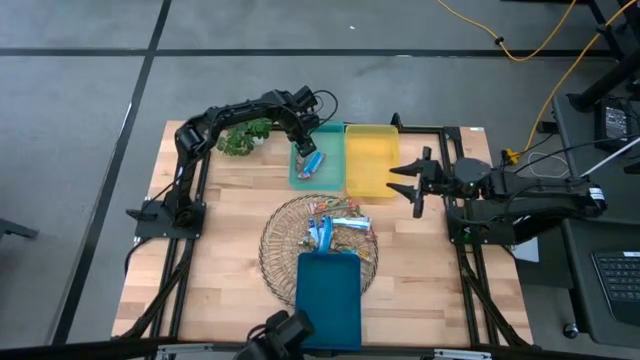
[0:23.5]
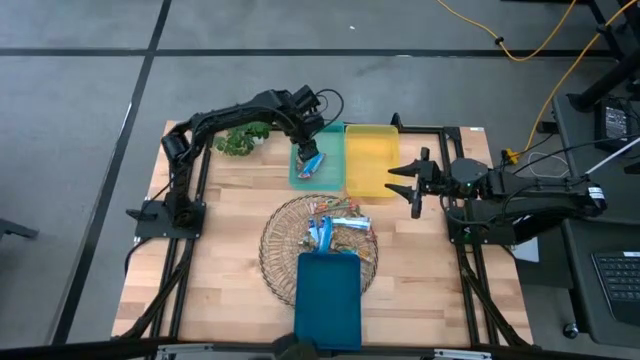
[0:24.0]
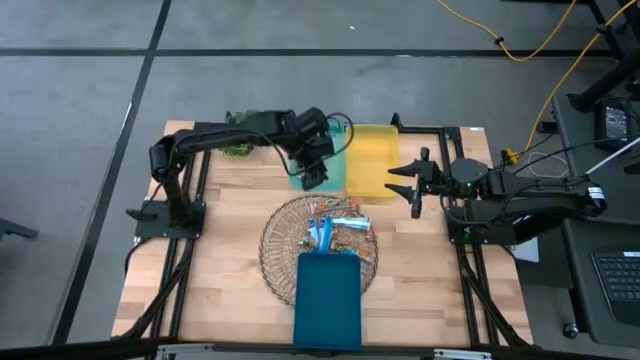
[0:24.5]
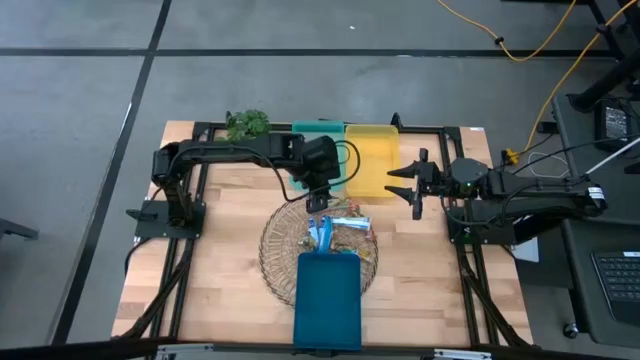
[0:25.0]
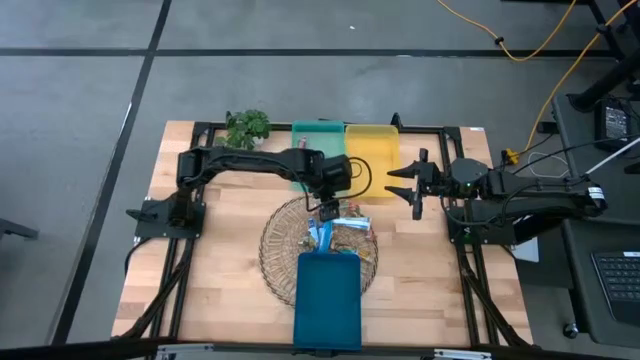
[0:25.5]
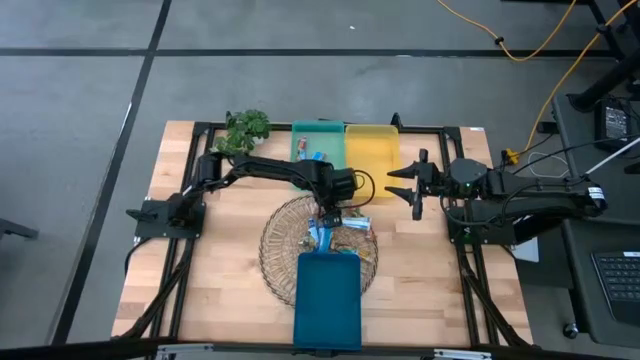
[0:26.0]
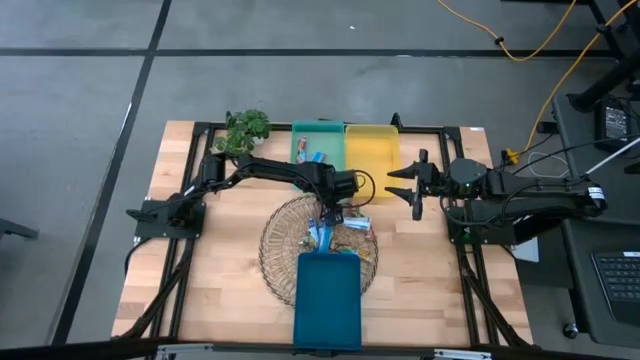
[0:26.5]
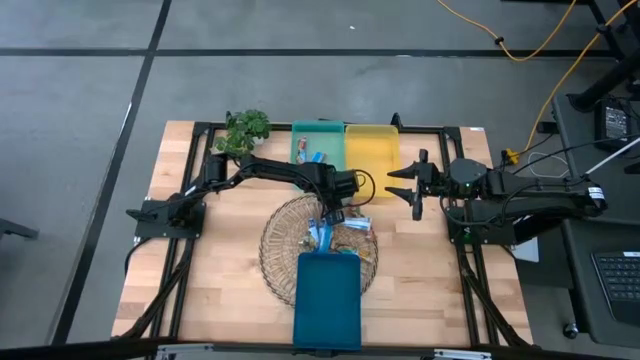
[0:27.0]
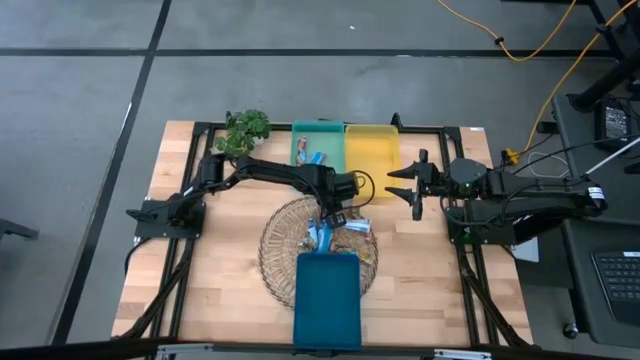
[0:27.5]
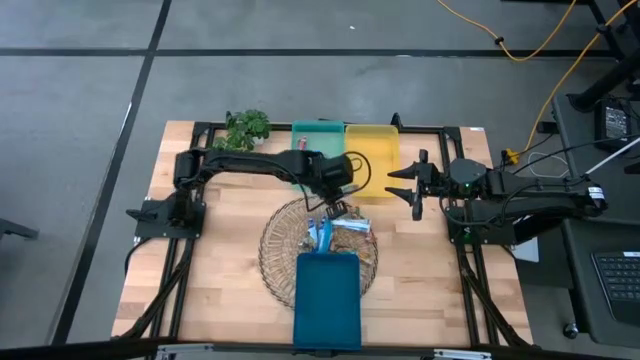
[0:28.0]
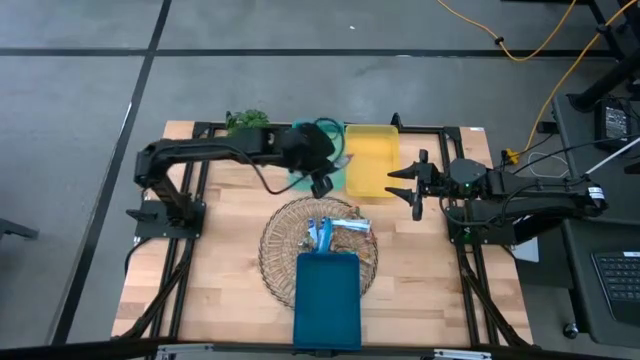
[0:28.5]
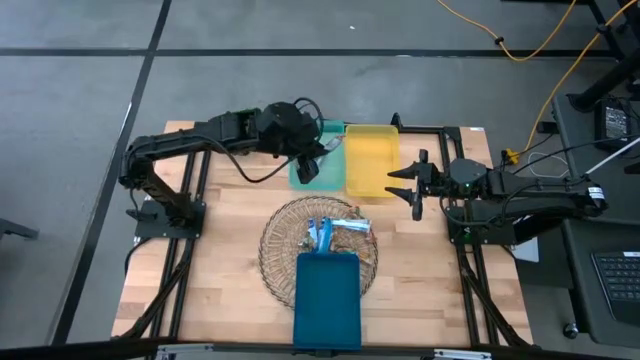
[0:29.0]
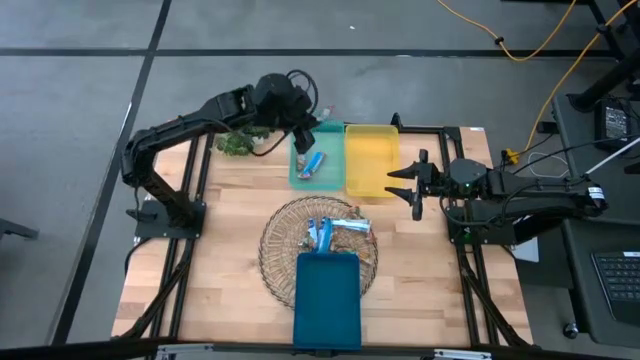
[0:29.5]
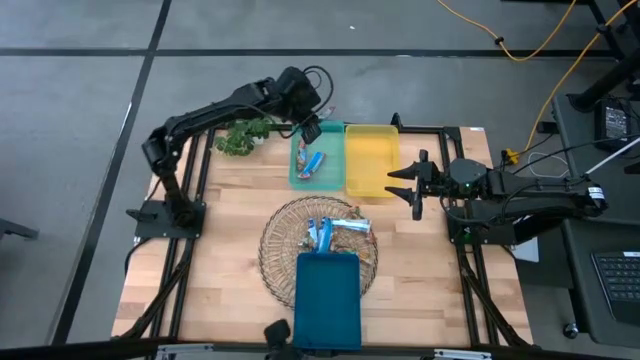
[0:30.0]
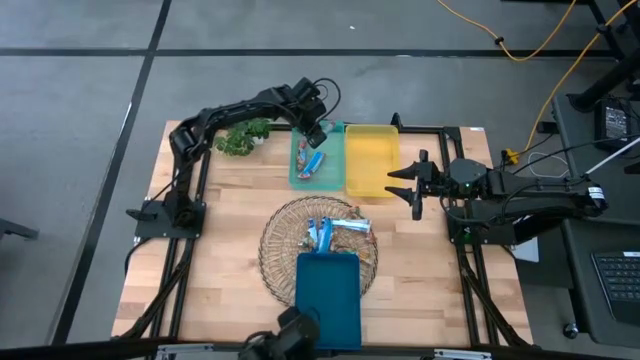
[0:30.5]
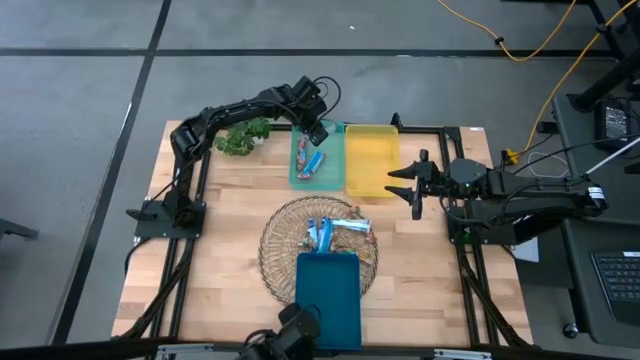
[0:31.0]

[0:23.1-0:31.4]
Task: Pick and place Granola Bars by type
Put the red granola bar into the green container

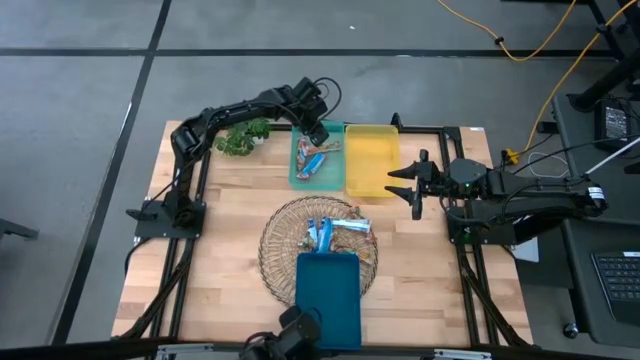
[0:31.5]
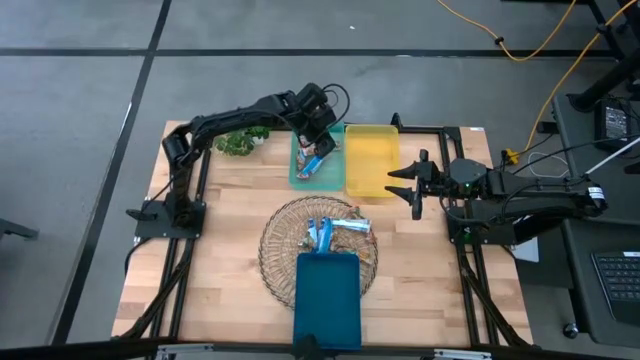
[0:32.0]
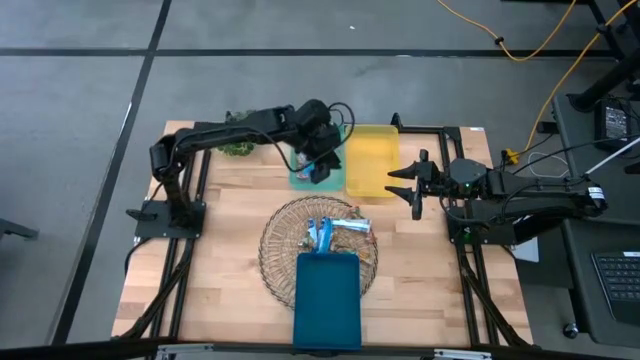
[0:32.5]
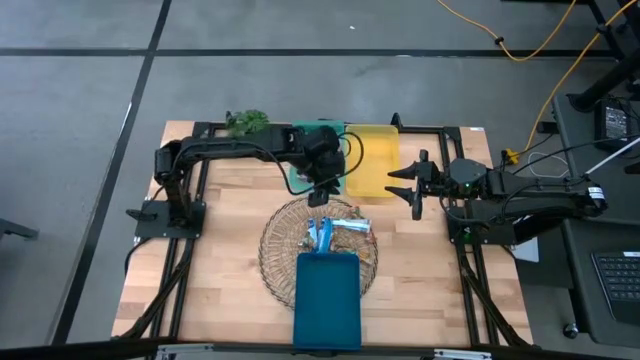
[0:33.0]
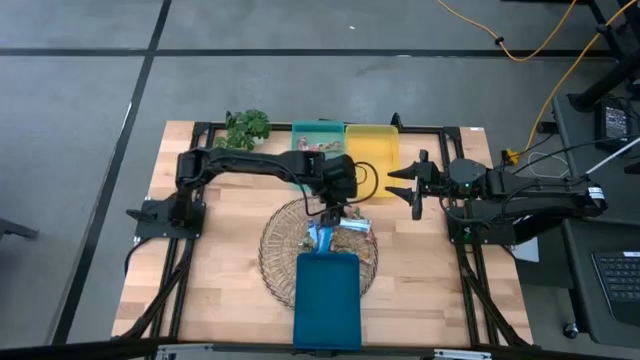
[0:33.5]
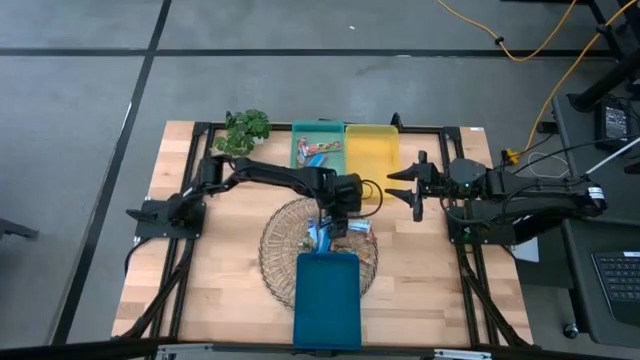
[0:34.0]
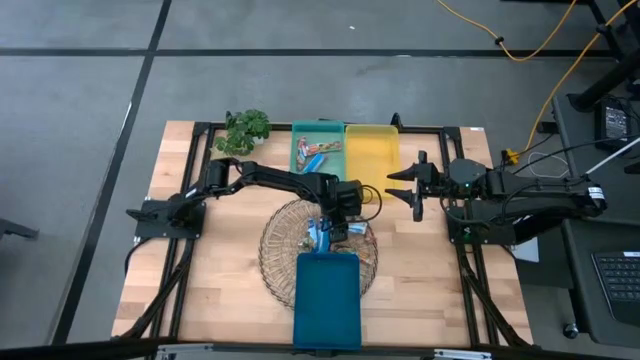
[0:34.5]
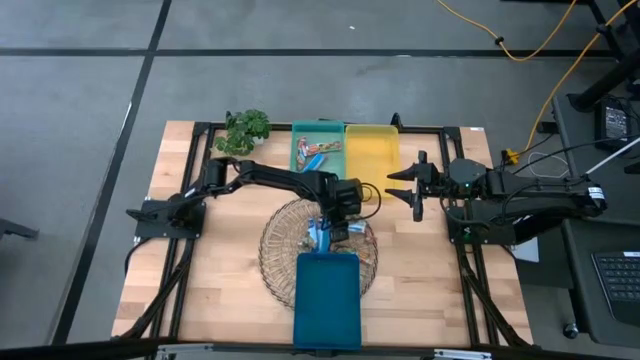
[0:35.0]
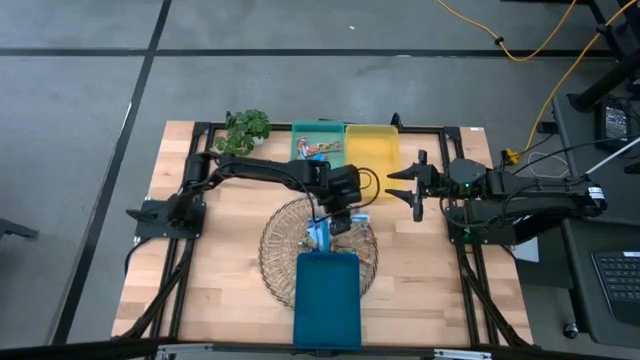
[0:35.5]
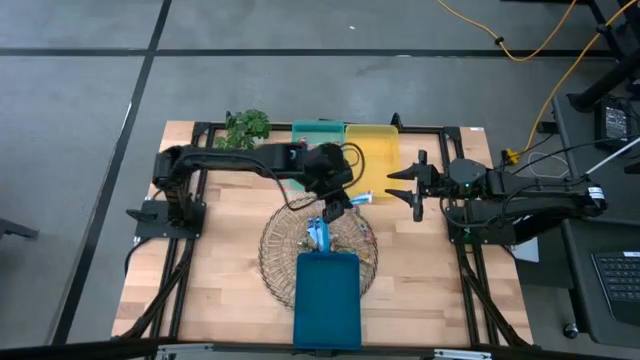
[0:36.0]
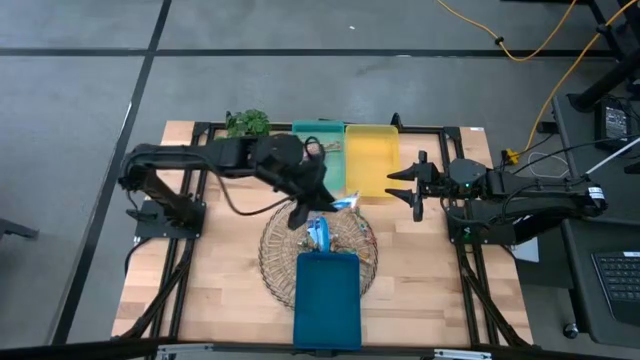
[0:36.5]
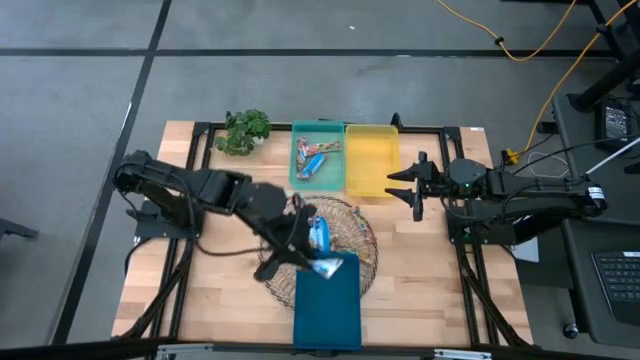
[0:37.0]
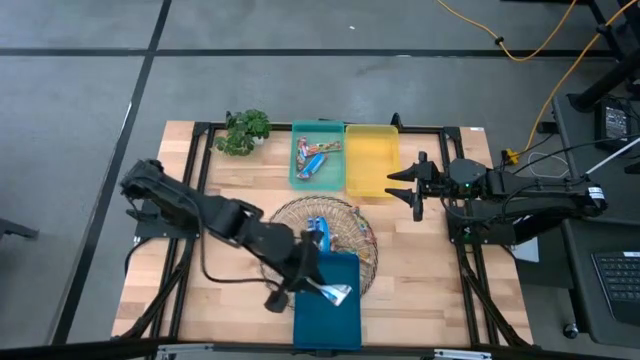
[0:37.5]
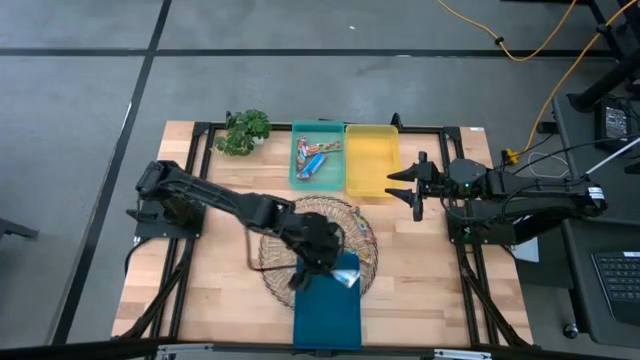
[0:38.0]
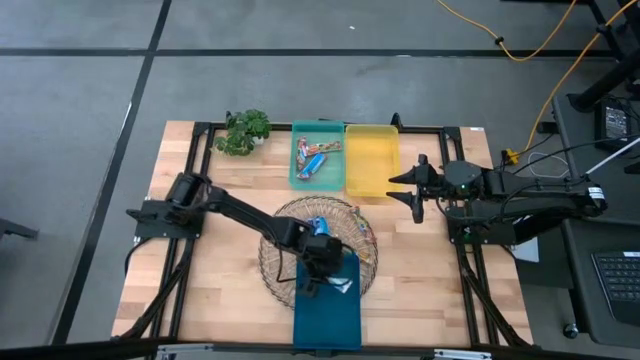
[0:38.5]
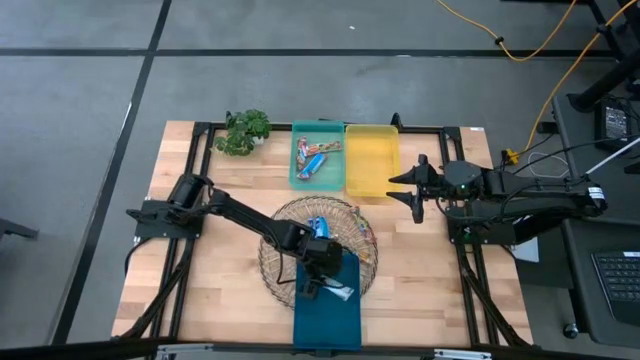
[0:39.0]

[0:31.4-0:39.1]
Put the yellow granola bar into the blue container

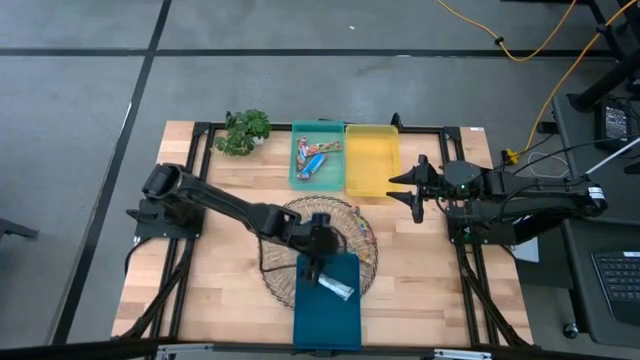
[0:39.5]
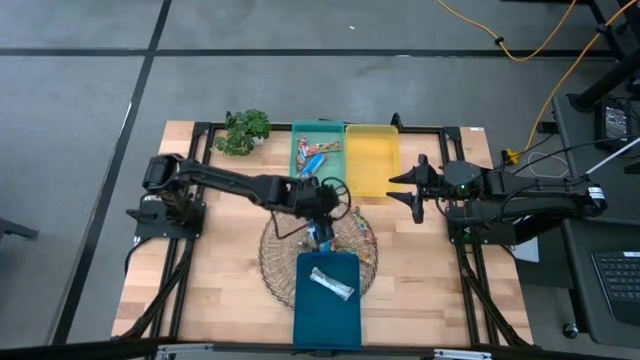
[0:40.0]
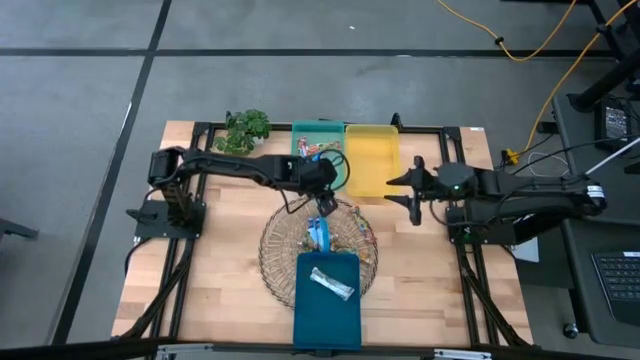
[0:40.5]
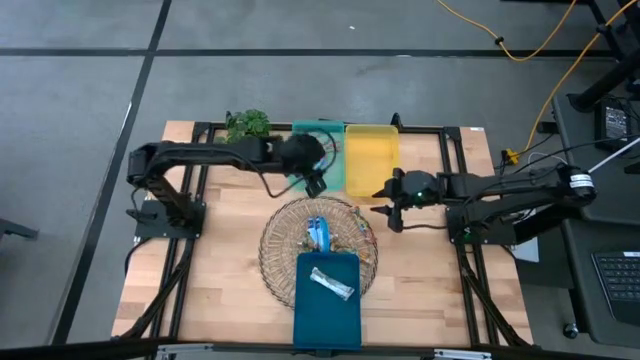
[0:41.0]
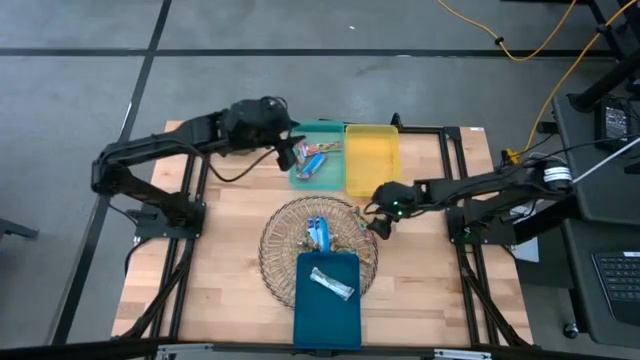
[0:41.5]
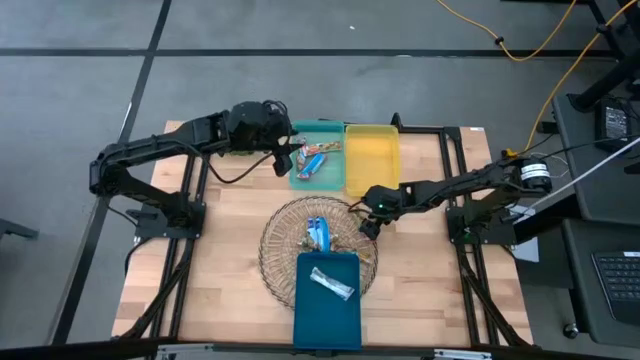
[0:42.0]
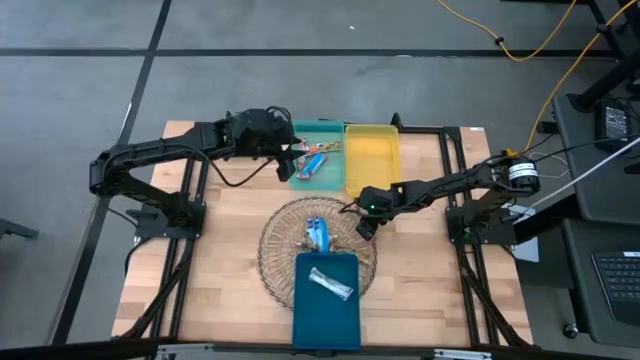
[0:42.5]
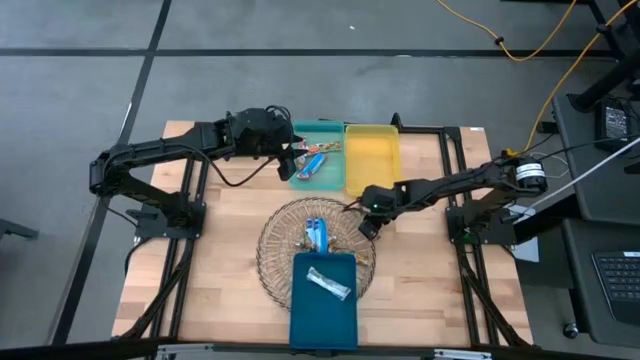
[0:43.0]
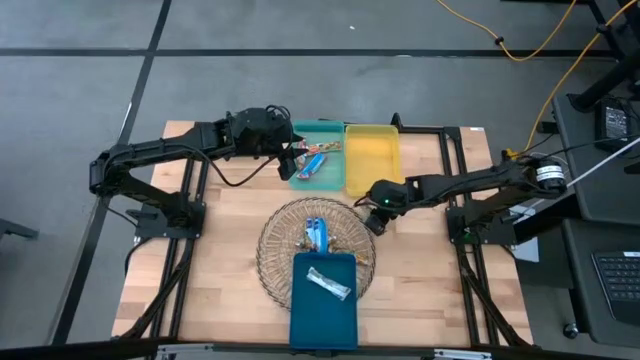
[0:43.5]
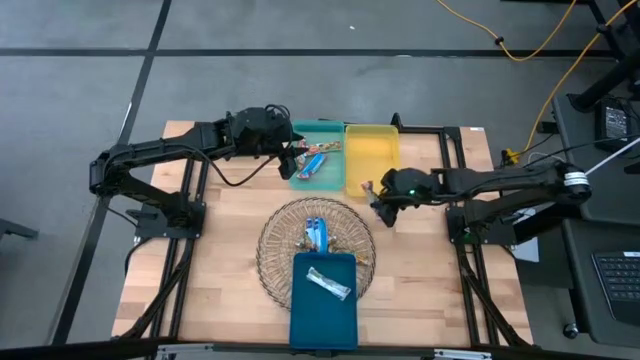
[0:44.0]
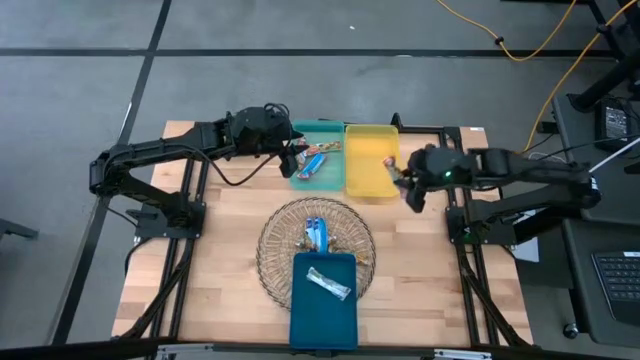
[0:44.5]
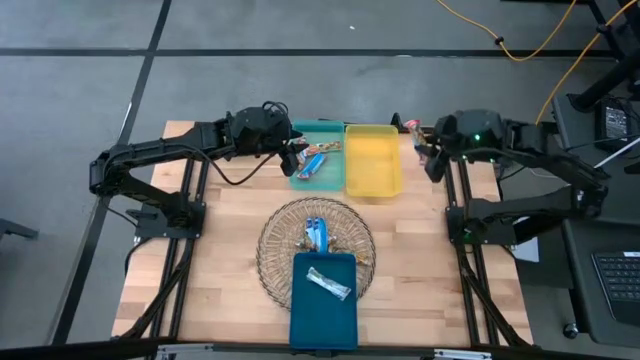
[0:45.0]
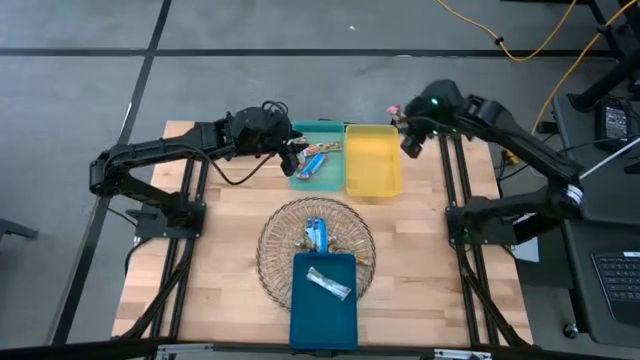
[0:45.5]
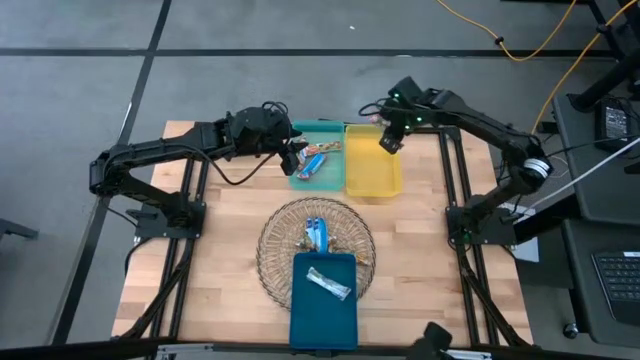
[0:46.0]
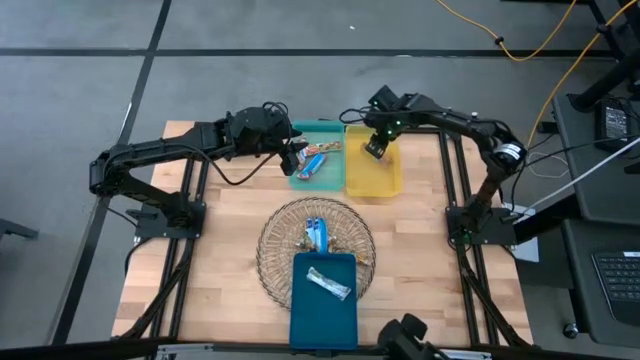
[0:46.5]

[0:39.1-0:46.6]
Put the red granola bar into the green container
